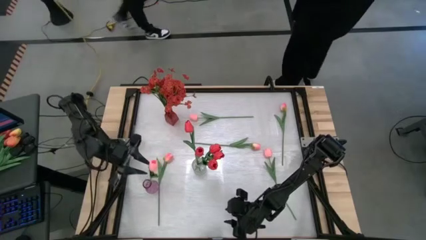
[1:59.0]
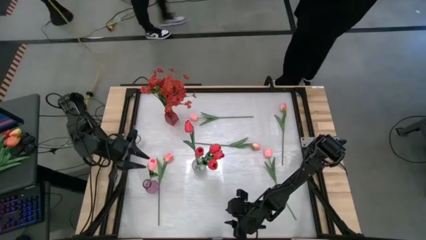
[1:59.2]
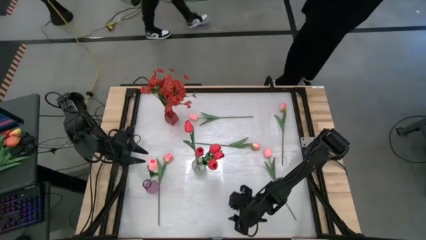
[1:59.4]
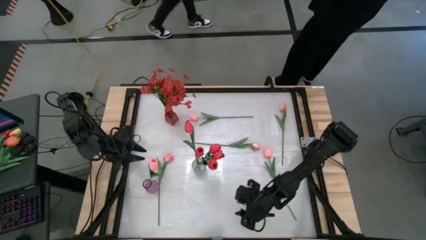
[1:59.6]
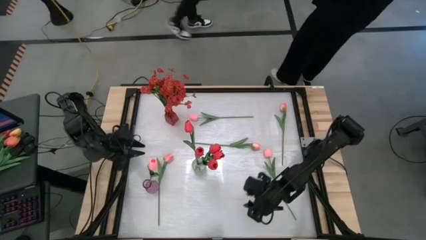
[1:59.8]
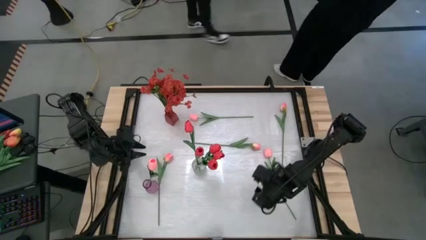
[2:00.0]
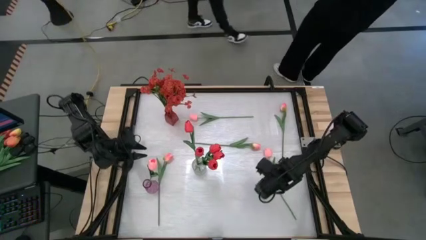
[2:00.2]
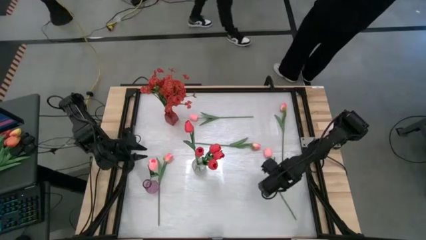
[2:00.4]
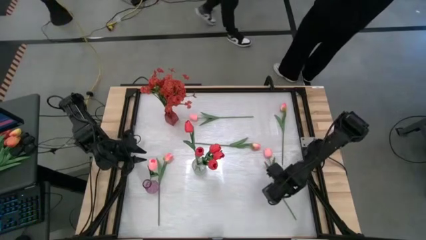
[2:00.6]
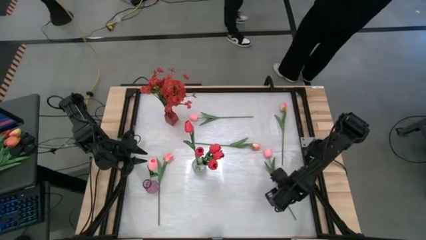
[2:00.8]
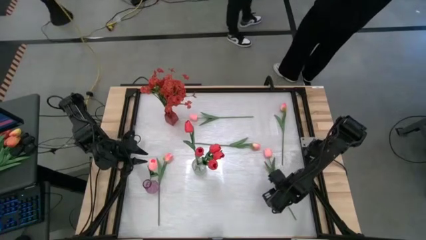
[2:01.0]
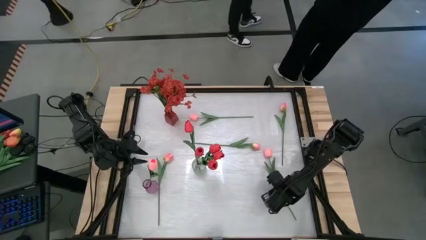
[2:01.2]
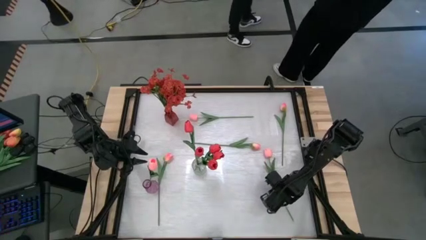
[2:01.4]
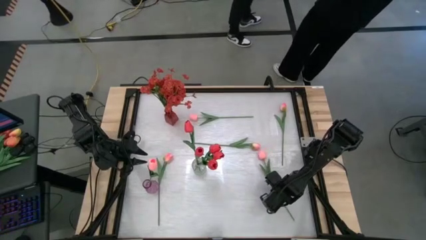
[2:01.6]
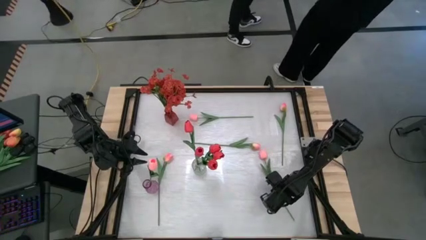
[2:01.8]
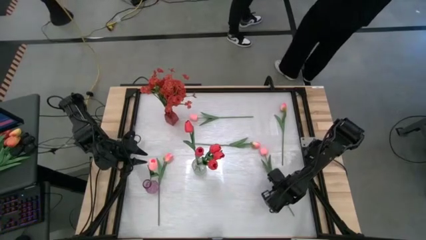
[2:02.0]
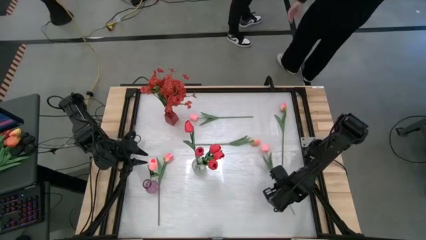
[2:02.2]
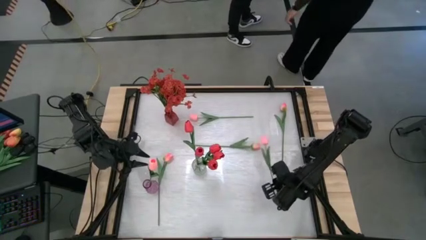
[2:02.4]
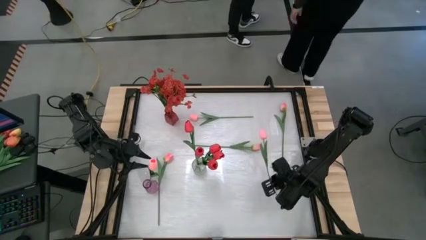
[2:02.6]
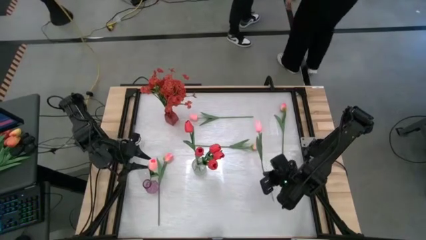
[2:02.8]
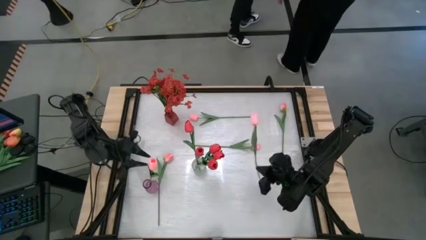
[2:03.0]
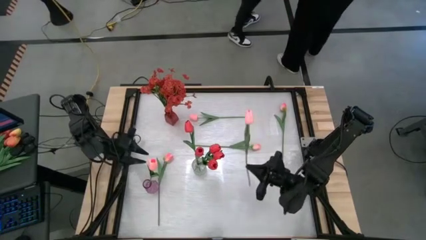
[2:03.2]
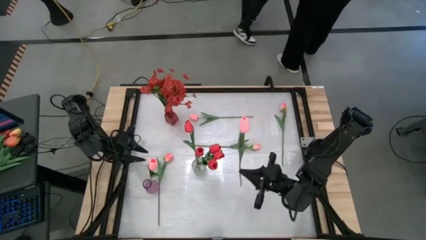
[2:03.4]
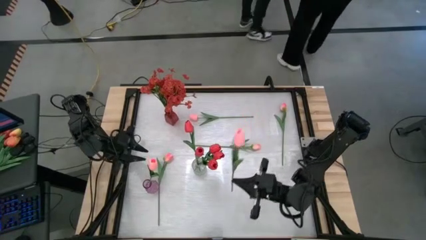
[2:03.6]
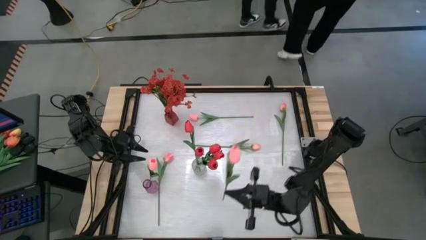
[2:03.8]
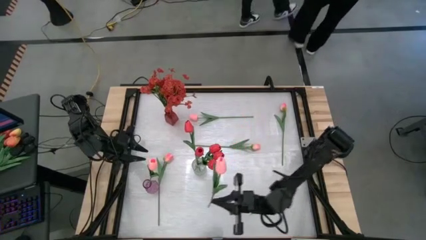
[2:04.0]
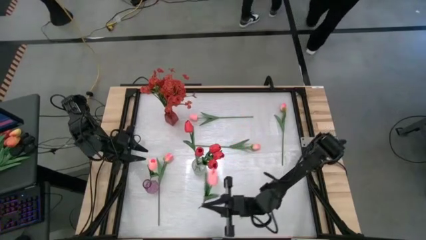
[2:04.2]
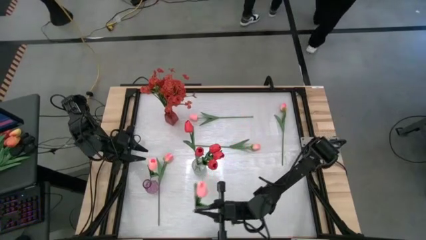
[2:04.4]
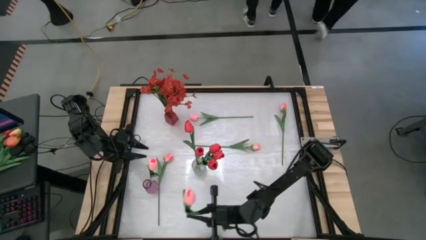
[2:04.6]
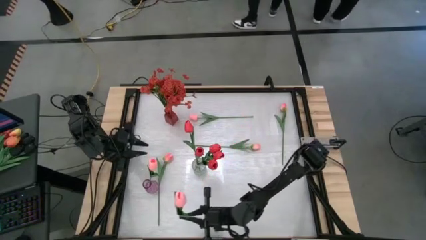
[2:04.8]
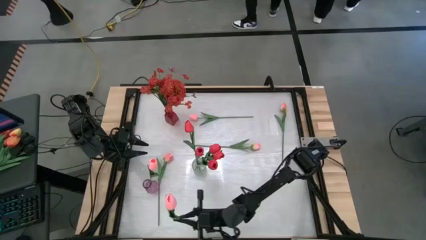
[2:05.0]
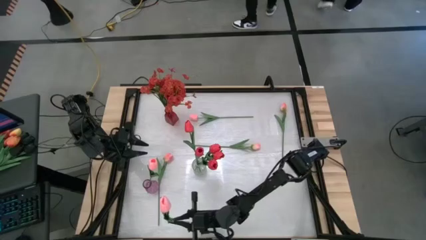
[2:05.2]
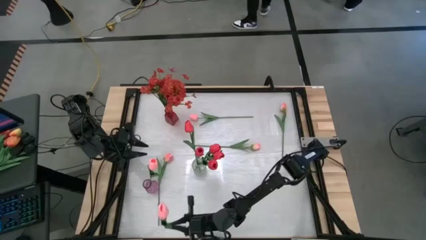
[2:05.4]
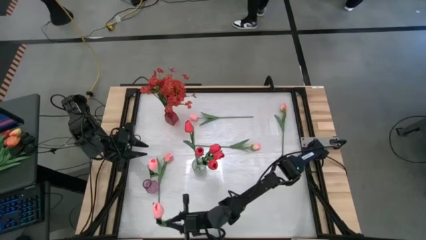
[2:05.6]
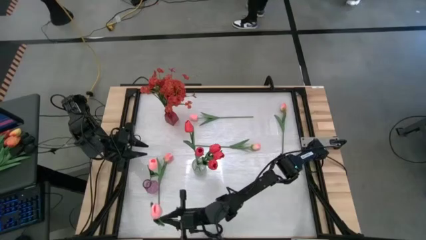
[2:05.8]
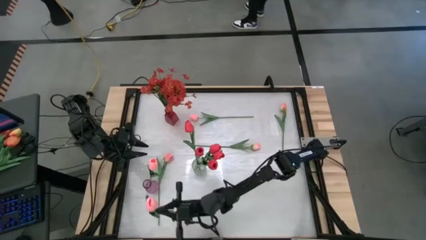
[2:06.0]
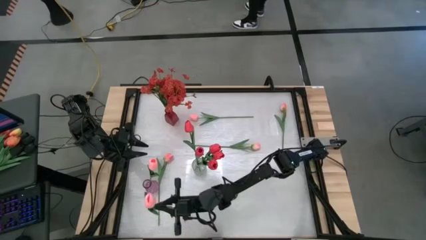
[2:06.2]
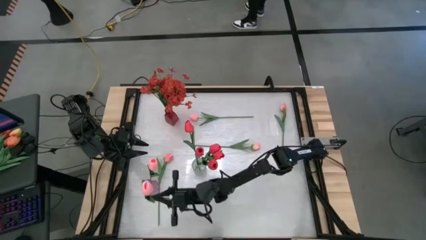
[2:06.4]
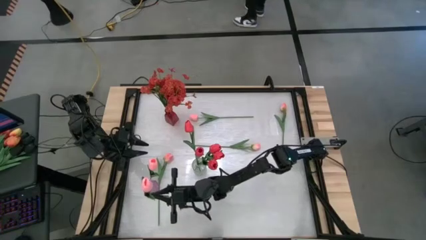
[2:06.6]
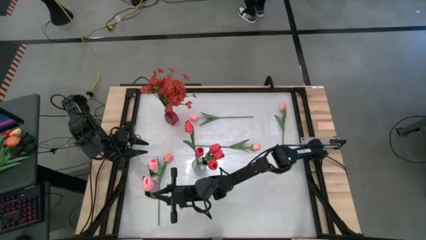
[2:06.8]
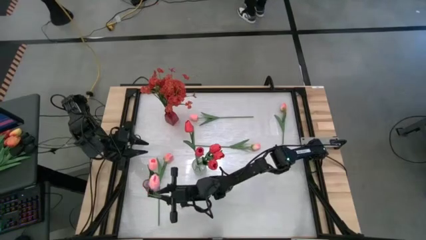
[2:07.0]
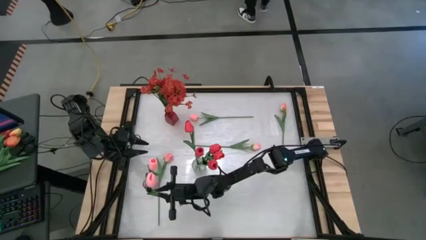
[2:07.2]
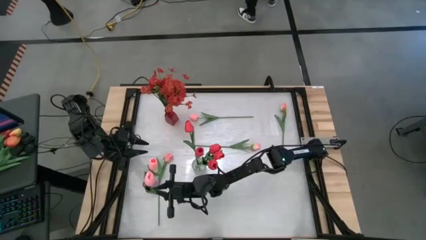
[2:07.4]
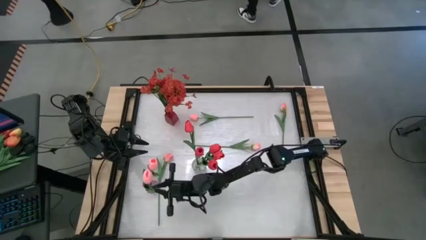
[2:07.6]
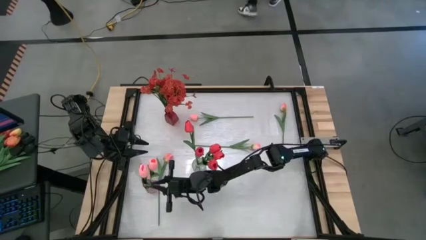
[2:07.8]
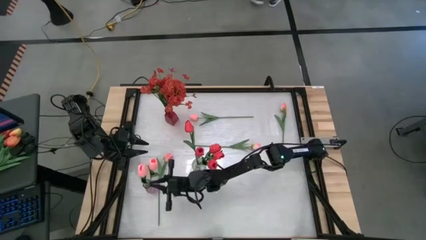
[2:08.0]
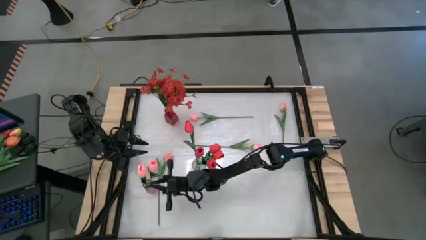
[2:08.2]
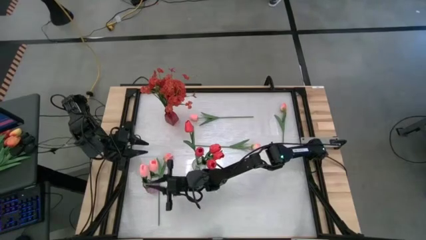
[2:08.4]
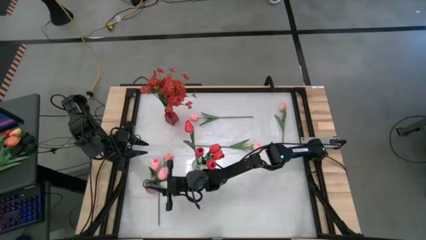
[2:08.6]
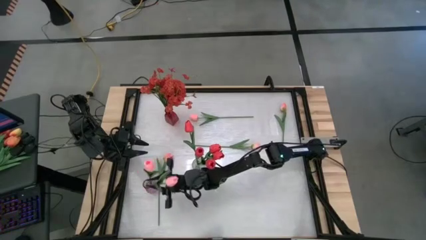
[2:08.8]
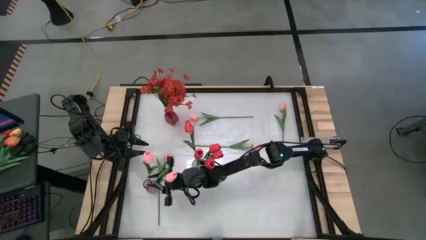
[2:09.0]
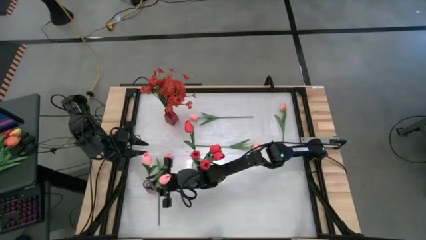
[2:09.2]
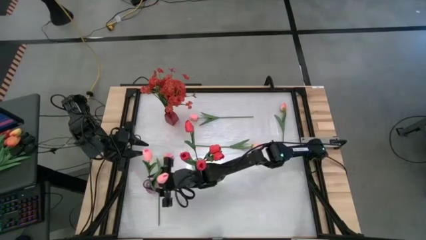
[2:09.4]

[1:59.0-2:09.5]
Task: Sort flowers into vase by color
Put the pink flower into the purple vase
